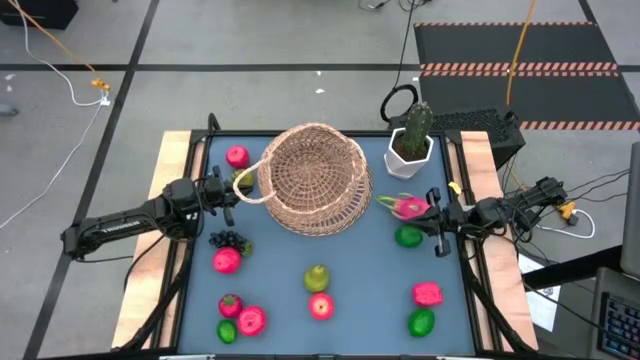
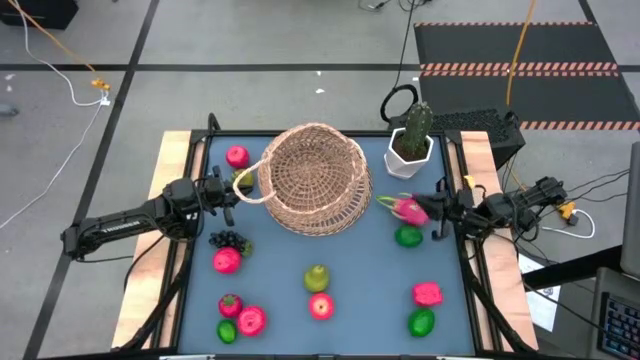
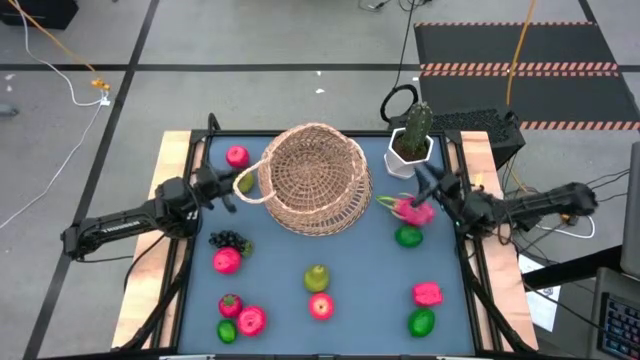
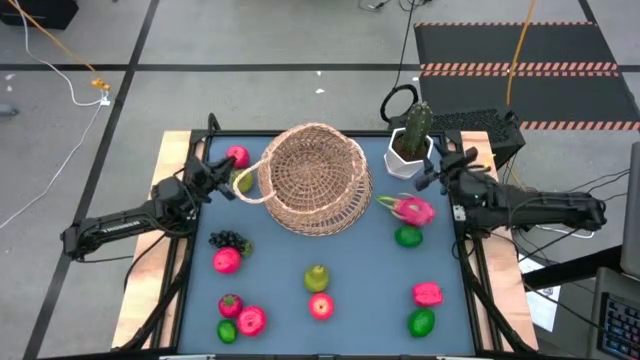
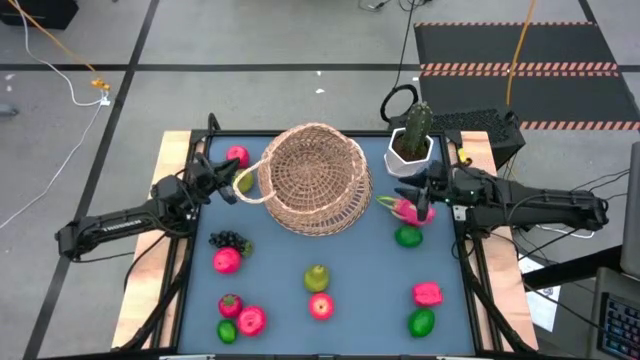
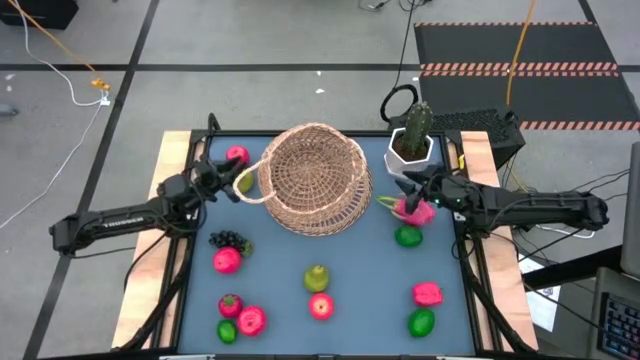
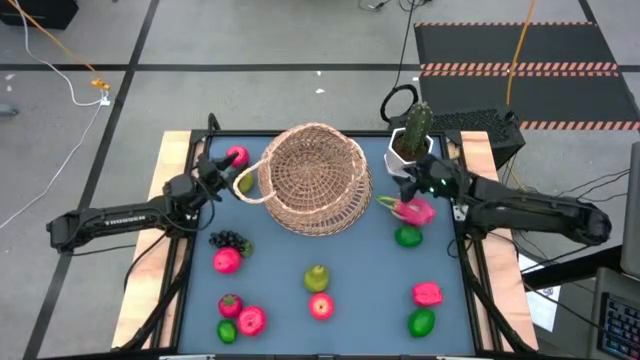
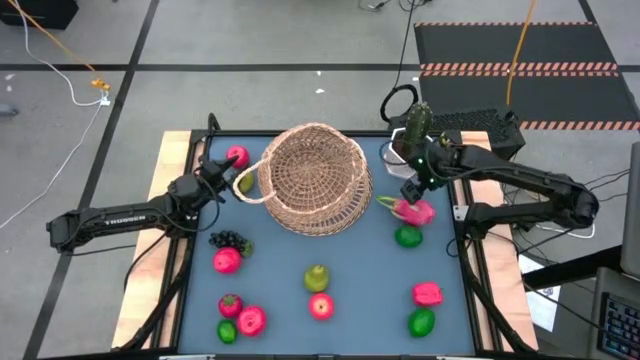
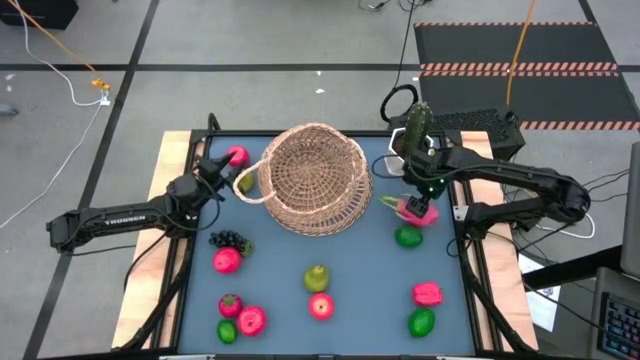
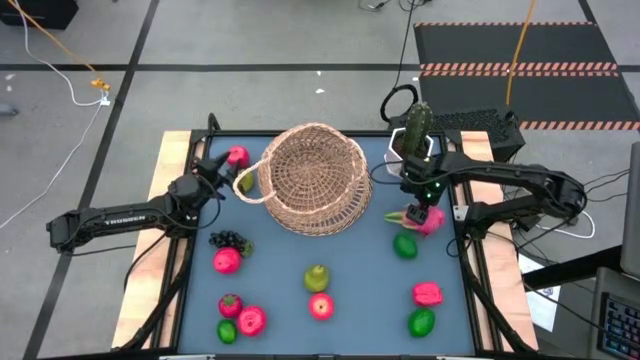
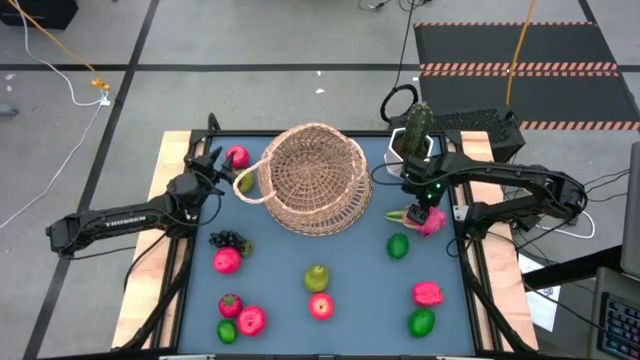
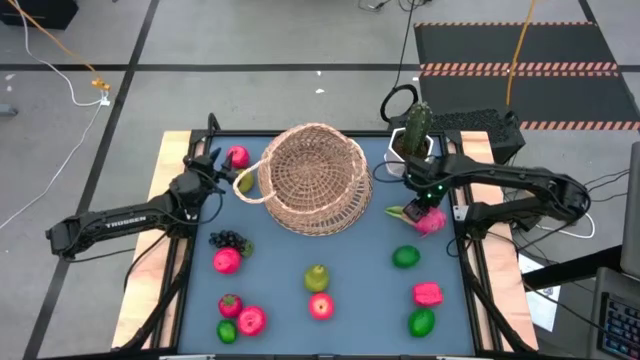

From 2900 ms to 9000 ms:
Task: Build produce basket
Put the dragon fruit into the brown basket

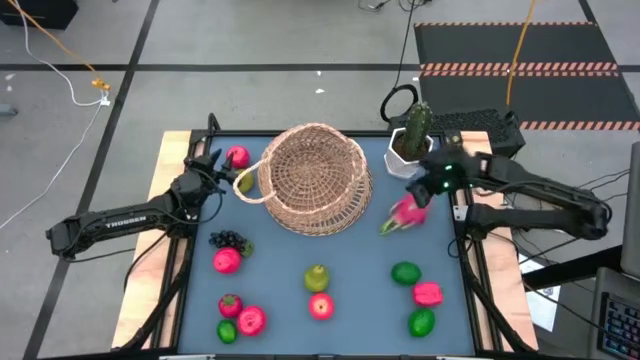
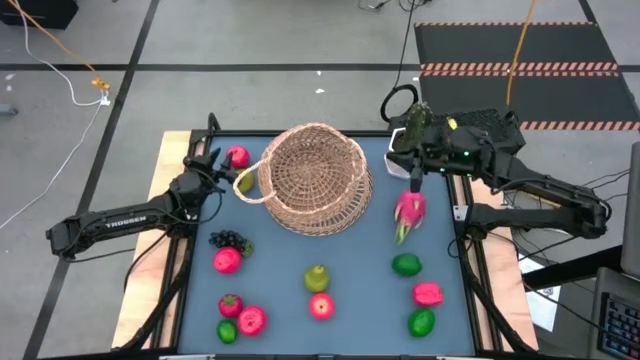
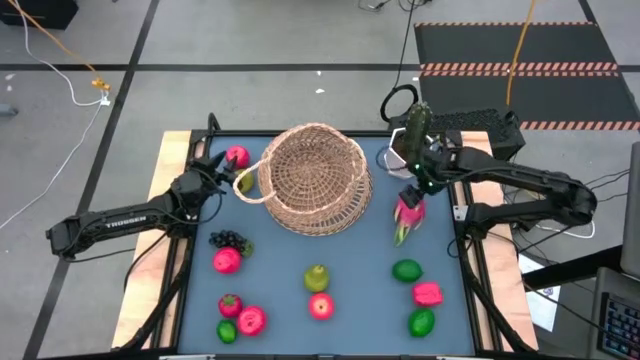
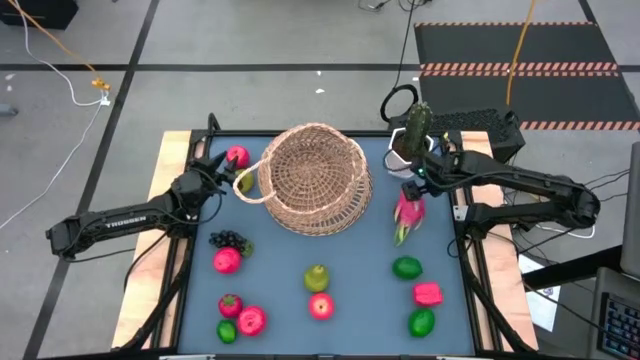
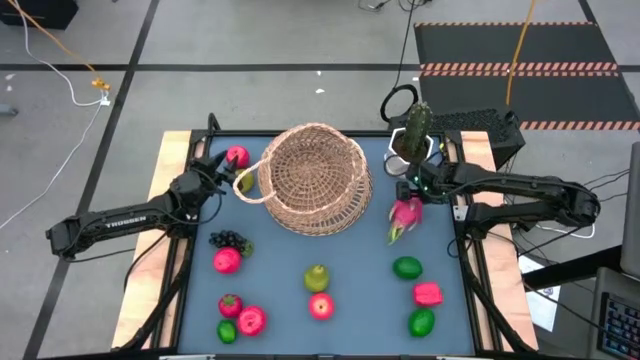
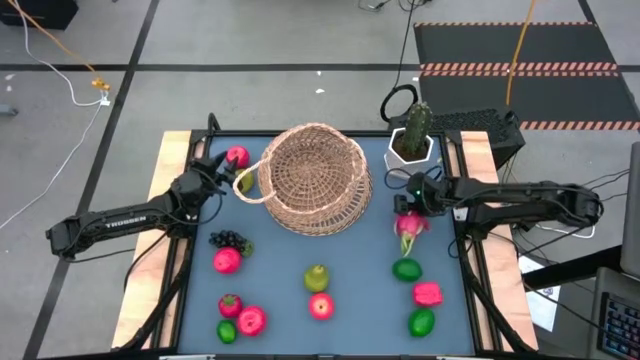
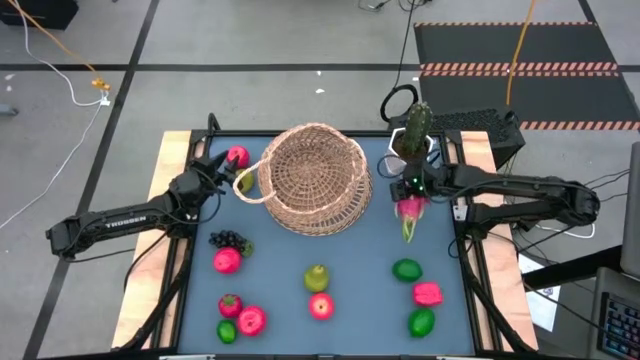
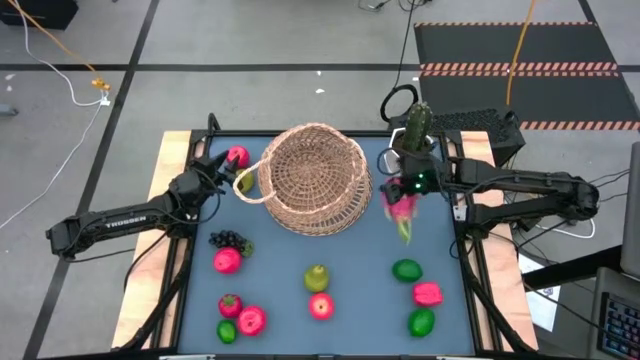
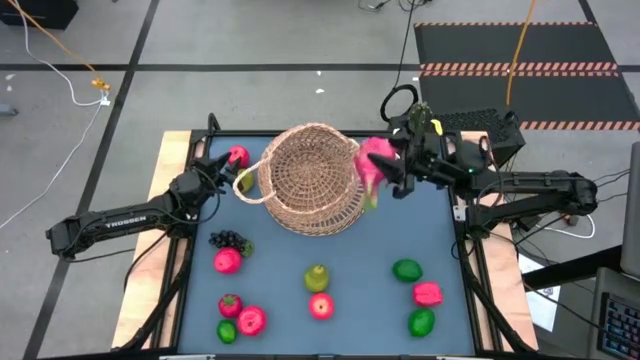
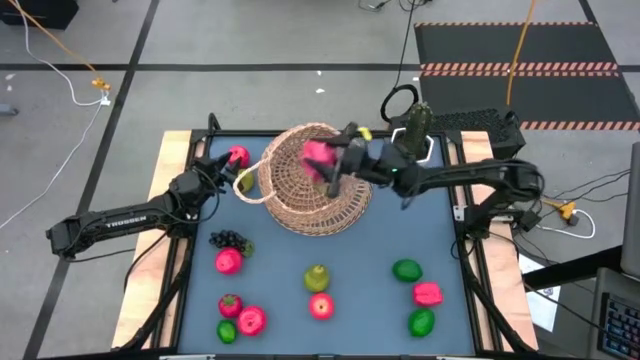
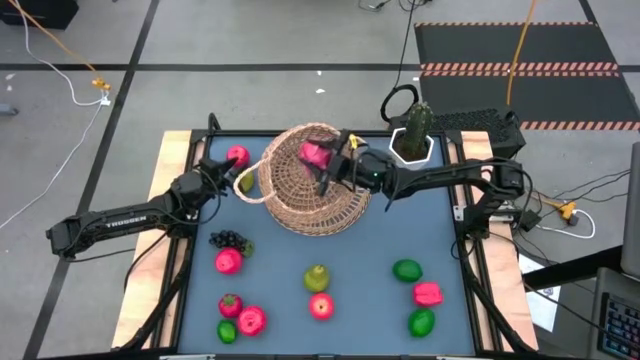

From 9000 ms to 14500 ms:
Put the dragon fruit into the brown basket

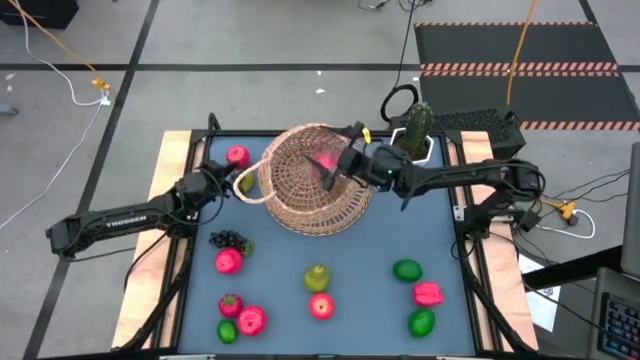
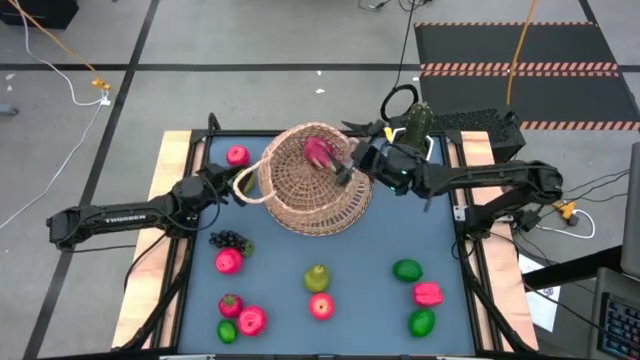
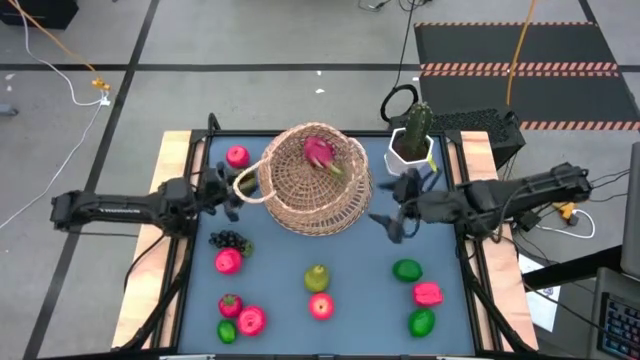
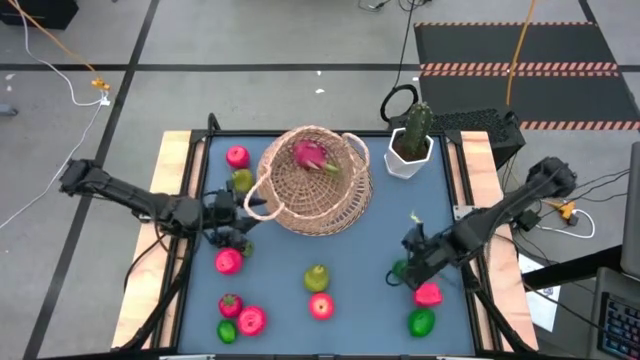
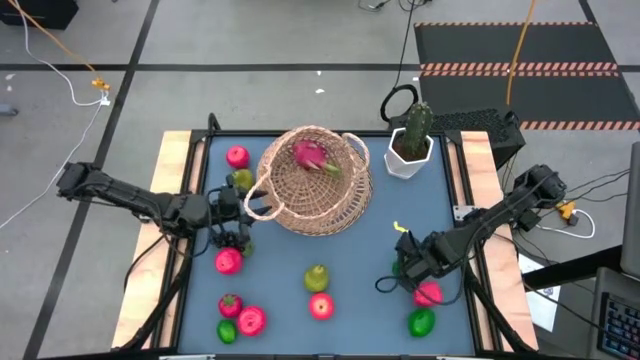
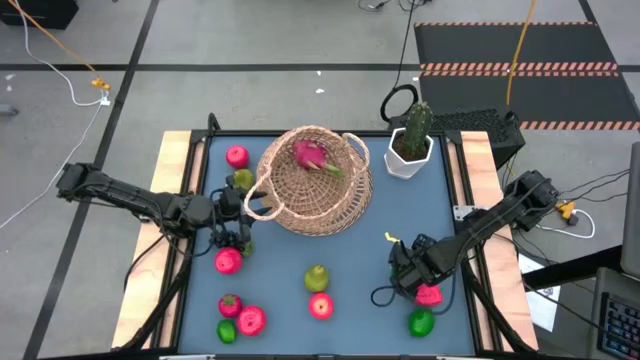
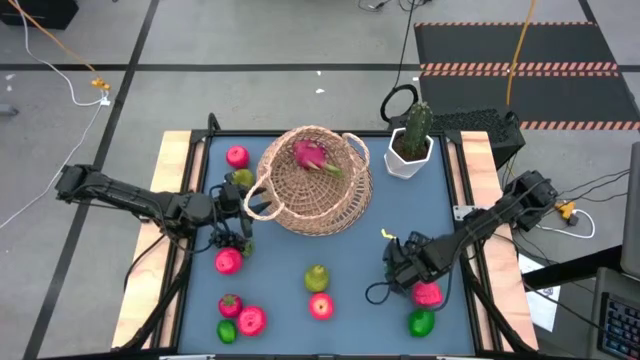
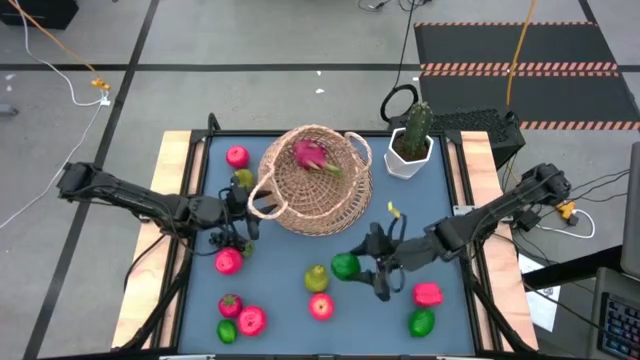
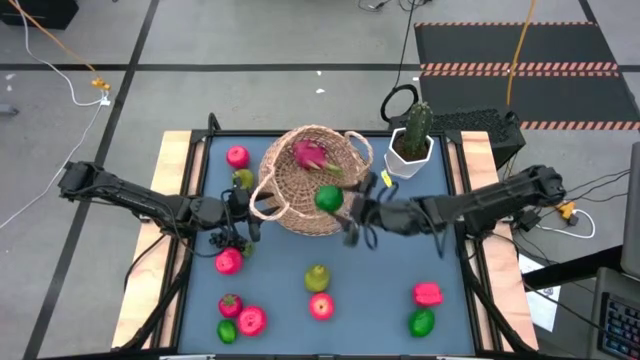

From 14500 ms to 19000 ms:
Put the lime into the brown basket

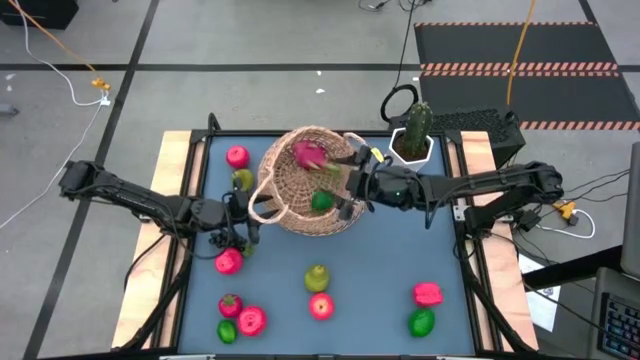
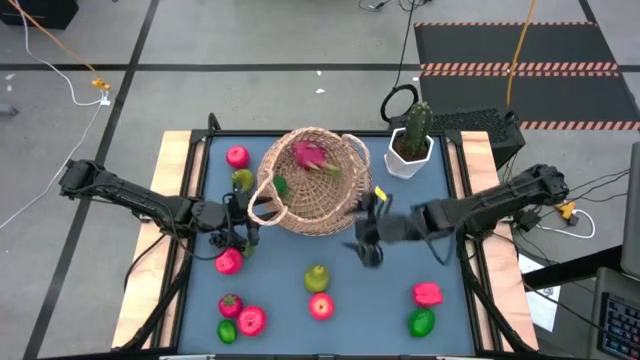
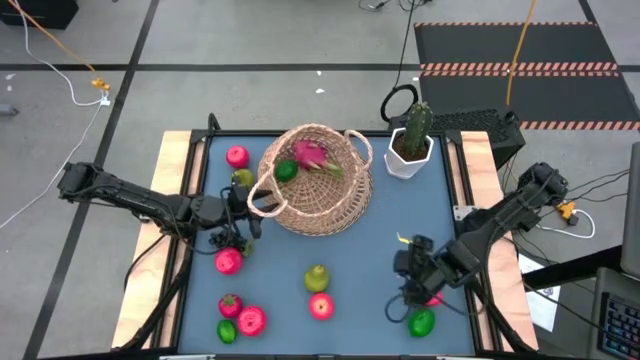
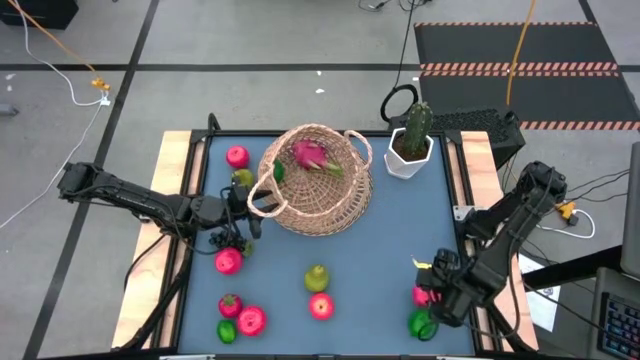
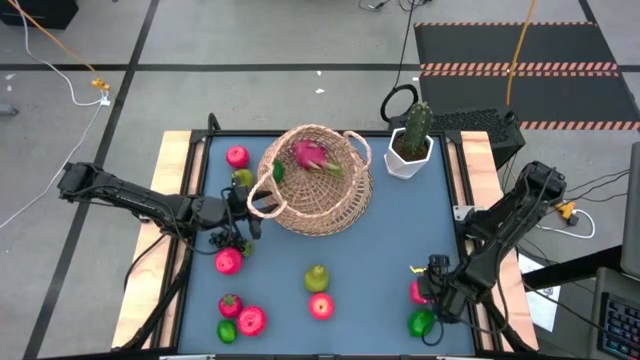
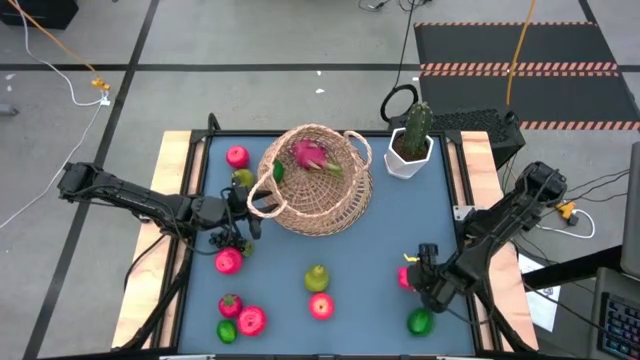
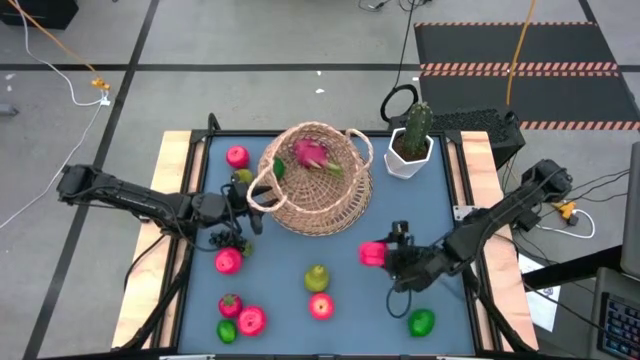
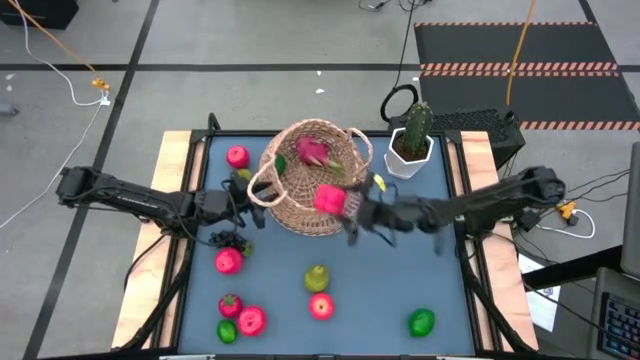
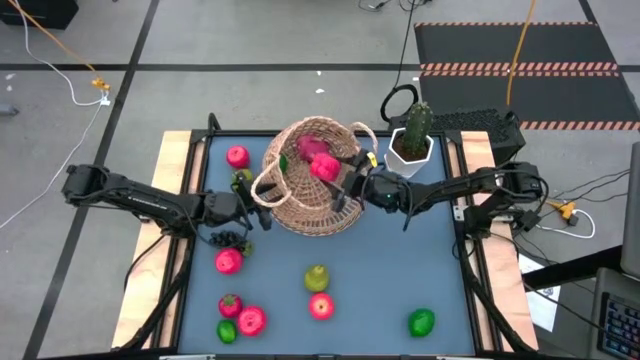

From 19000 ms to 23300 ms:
Put the red bell pepper into the brown basket
